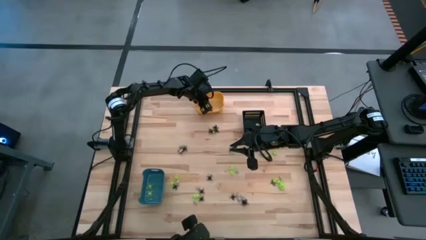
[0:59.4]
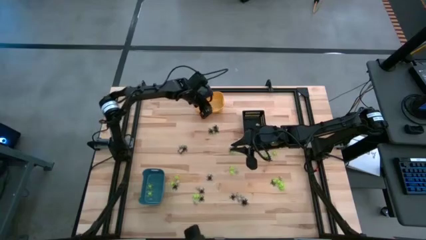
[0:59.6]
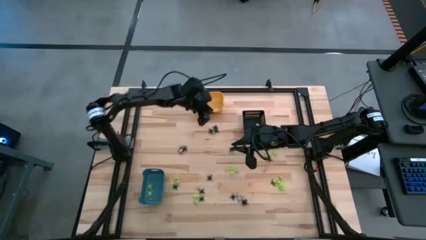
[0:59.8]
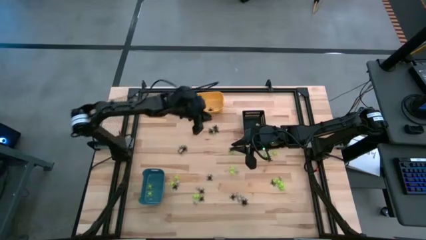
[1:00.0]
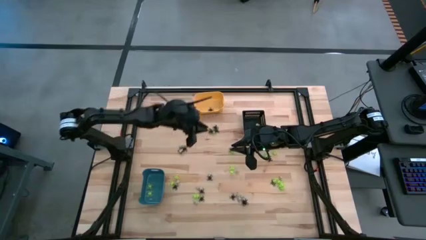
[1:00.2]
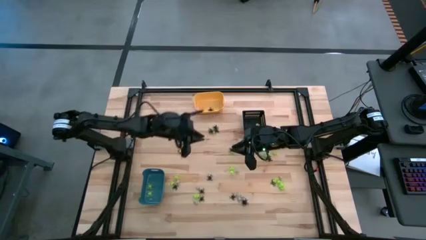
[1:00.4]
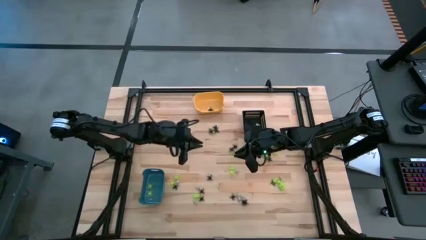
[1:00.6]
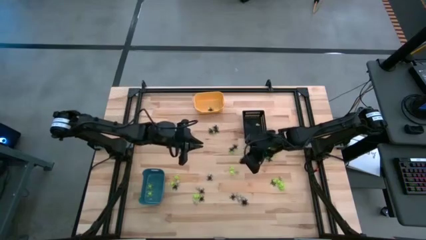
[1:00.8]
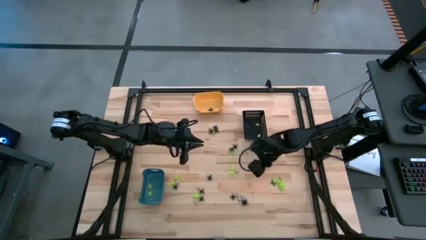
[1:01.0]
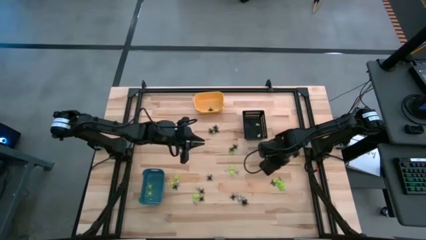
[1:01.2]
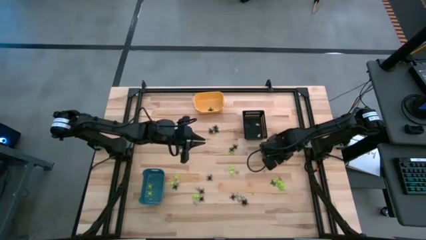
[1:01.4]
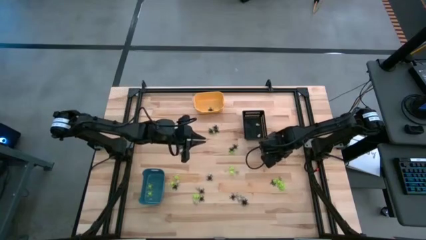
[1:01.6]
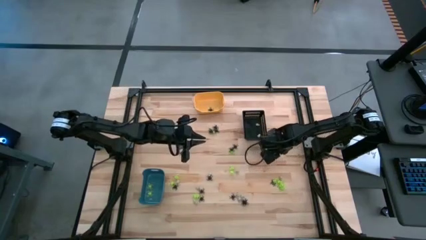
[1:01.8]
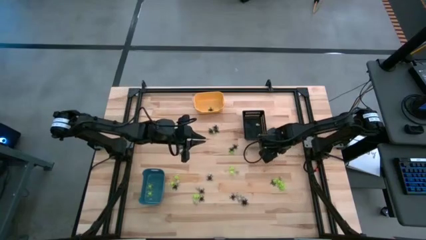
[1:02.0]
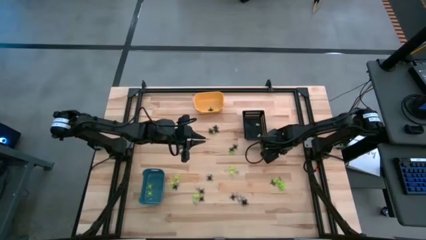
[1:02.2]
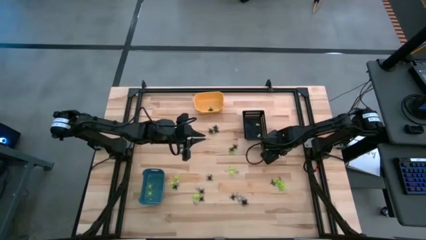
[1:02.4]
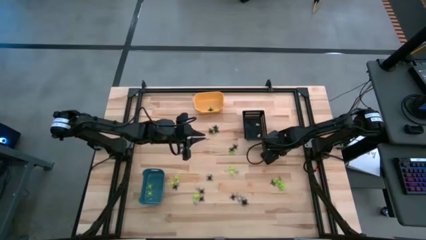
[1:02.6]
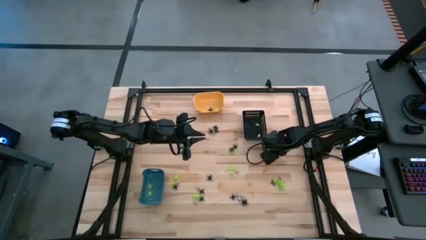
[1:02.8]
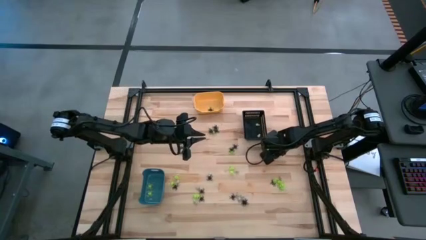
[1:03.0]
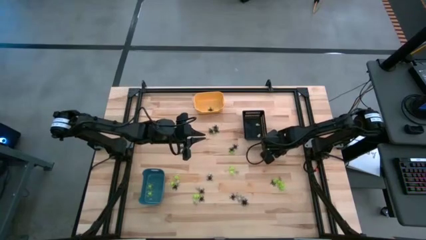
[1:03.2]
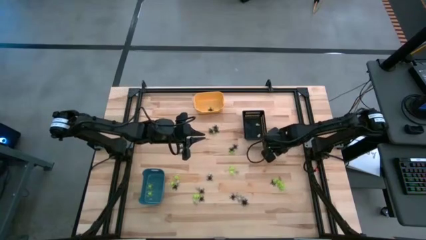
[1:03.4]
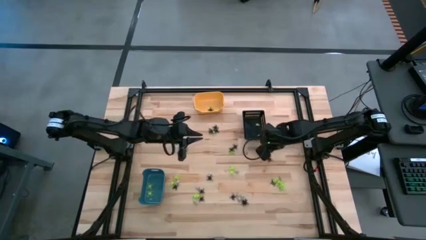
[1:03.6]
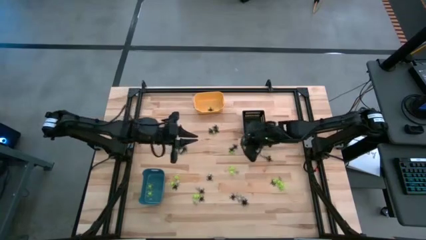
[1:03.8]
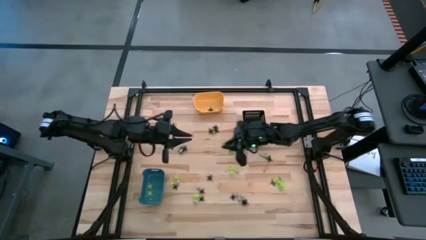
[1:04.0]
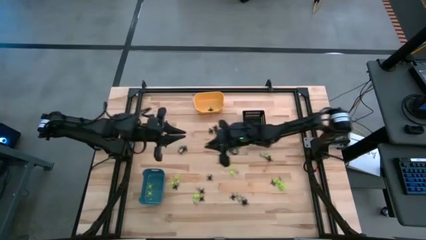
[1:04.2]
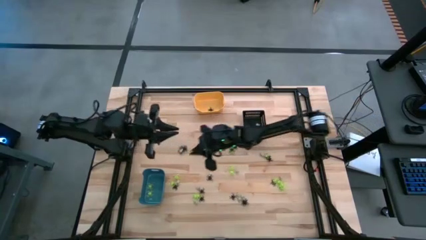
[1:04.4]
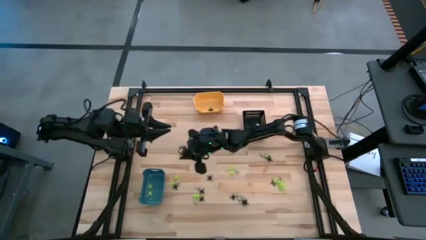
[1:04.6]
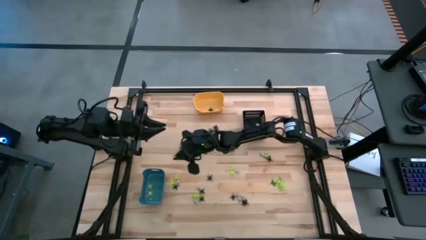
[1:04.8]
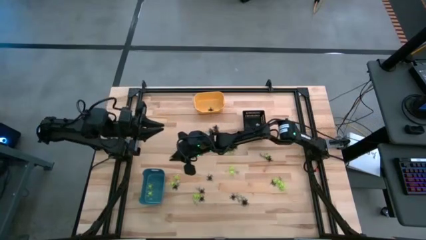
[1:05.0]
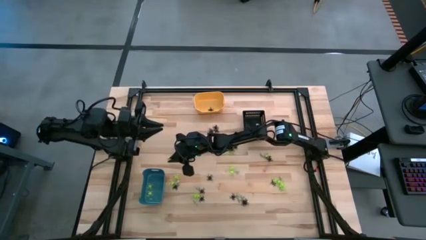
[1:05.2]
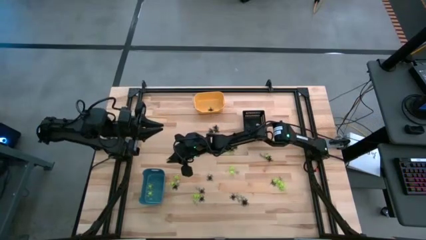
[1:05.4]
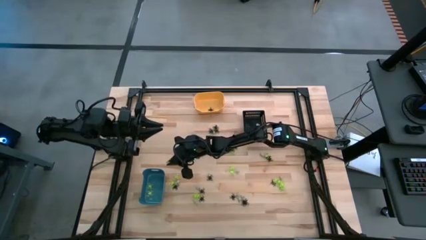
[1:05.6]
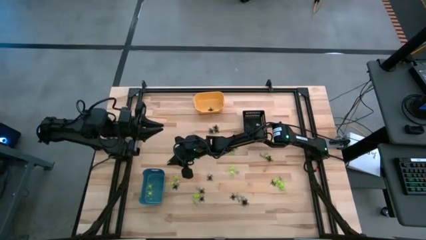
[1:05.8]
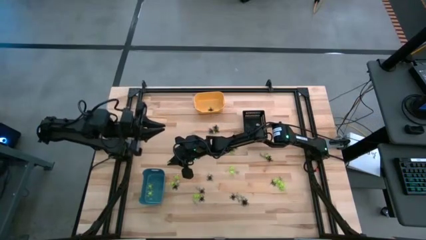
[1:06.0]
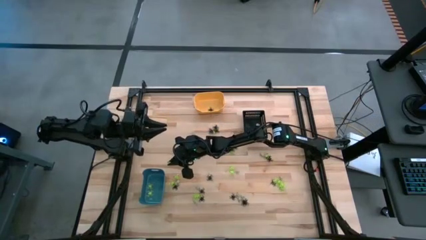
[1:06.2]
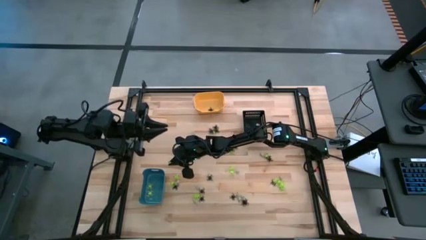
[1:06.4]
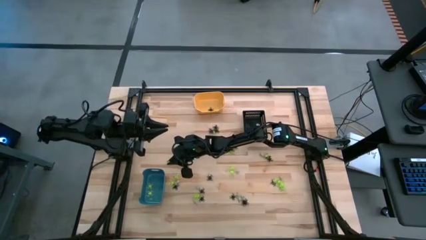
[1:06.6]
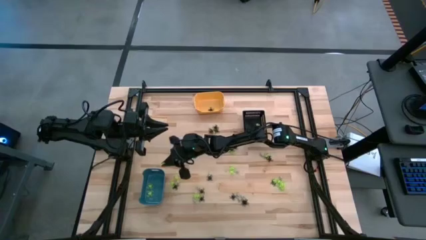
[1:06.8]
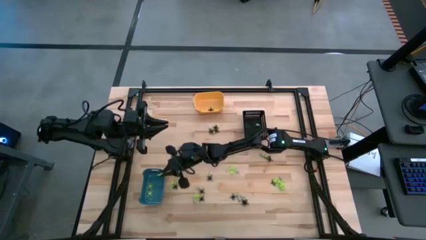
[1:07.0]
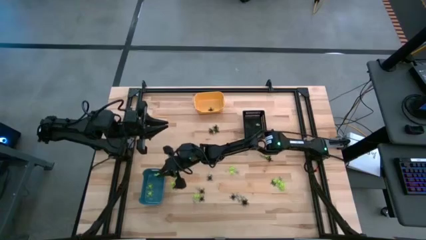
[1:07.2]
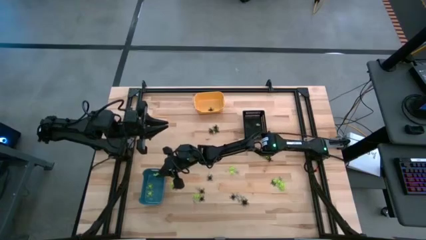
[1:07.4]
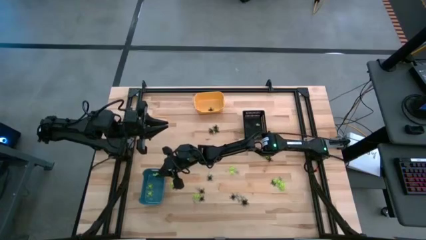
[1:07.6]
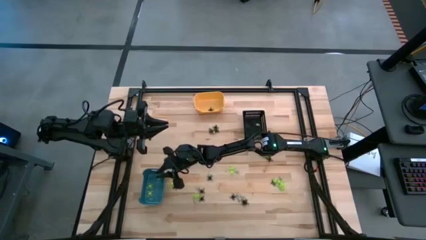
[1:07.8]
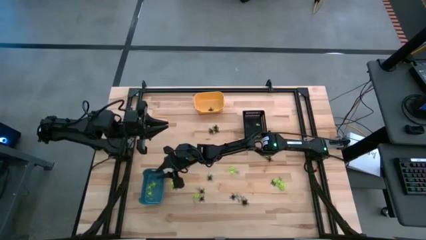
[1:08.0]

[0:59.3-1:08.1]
Task: Sort Halloween decoration
Put the green spider toy into the blue bin

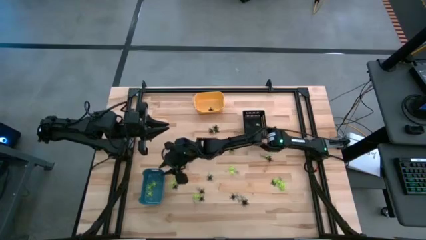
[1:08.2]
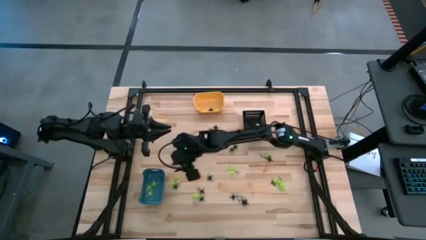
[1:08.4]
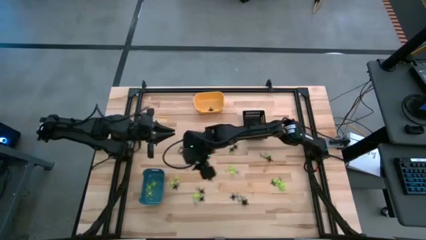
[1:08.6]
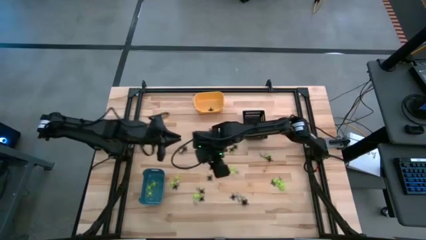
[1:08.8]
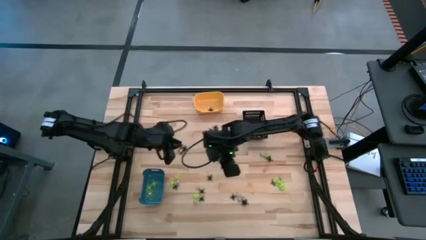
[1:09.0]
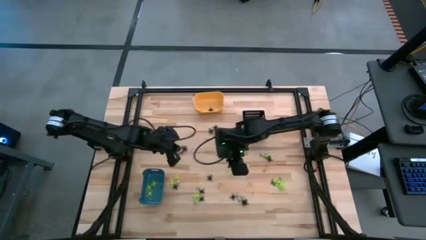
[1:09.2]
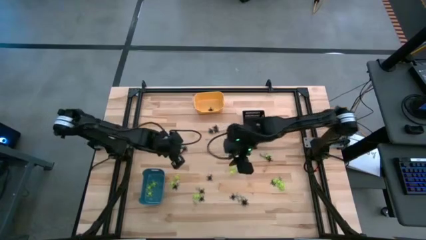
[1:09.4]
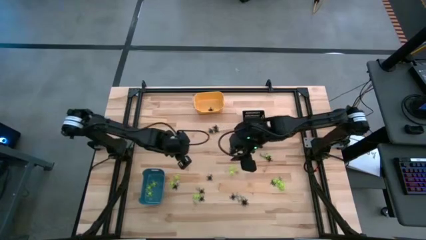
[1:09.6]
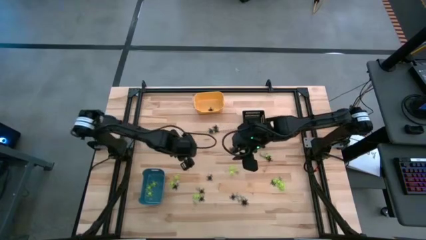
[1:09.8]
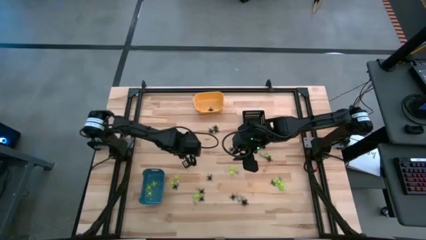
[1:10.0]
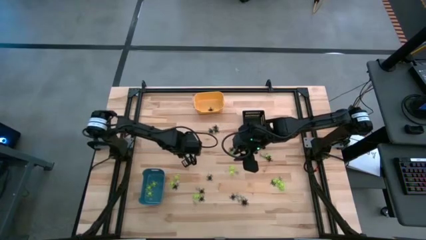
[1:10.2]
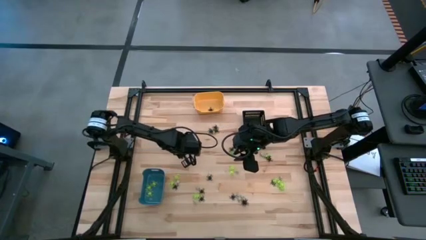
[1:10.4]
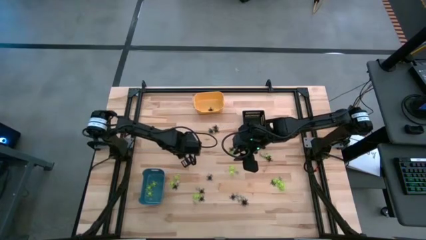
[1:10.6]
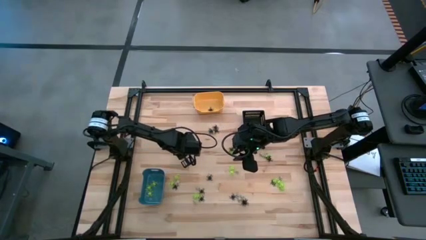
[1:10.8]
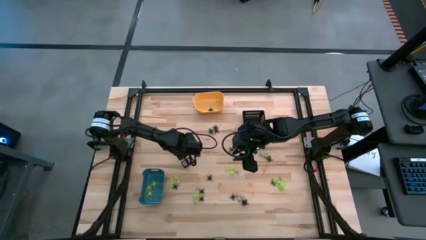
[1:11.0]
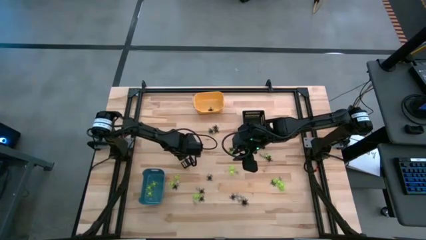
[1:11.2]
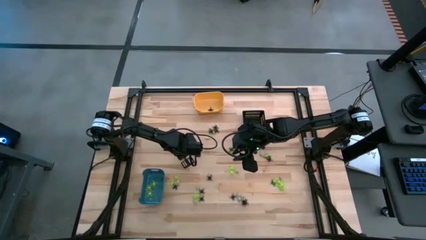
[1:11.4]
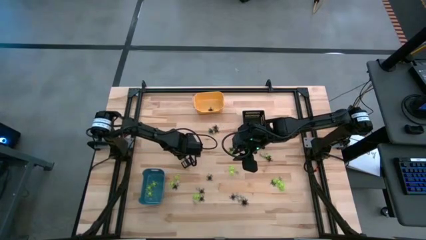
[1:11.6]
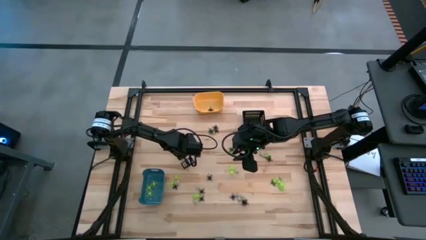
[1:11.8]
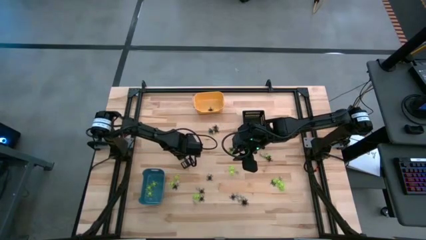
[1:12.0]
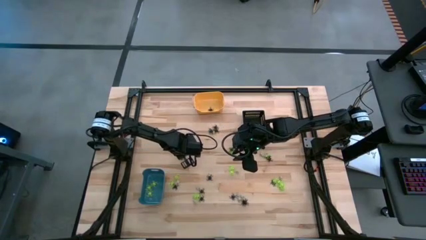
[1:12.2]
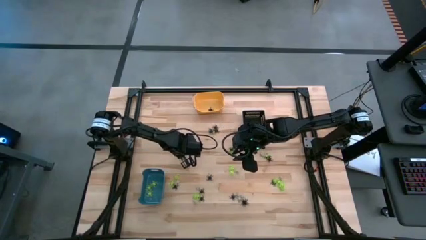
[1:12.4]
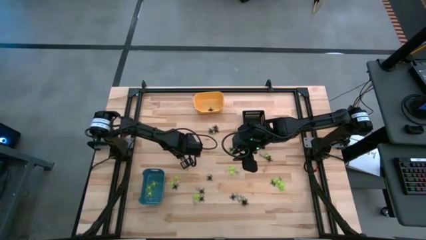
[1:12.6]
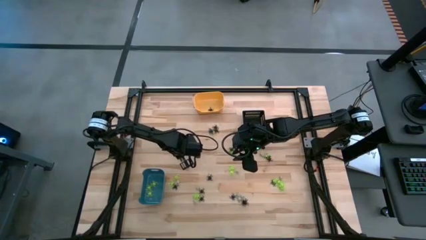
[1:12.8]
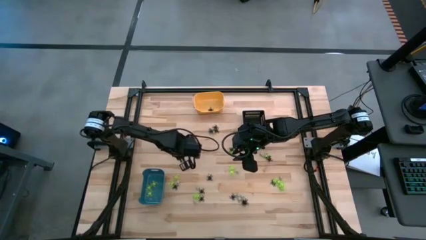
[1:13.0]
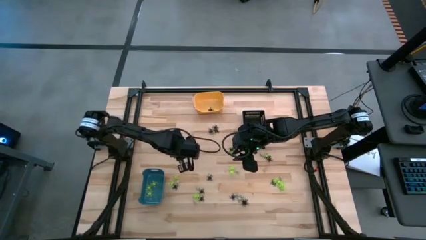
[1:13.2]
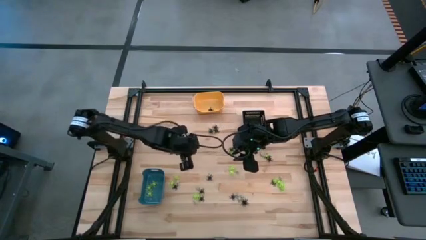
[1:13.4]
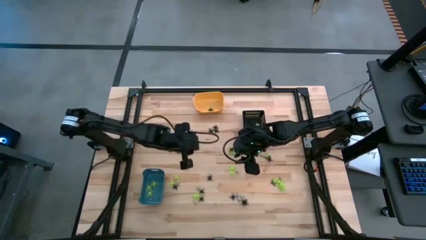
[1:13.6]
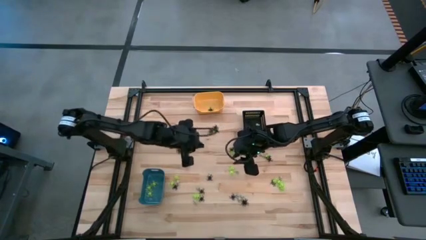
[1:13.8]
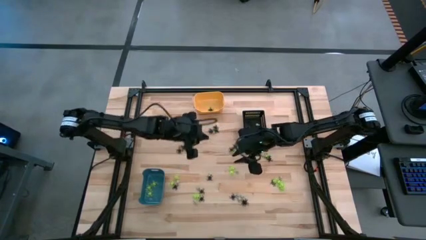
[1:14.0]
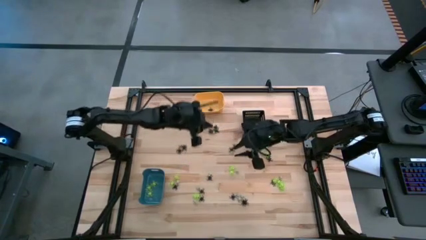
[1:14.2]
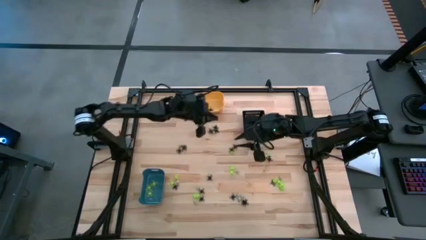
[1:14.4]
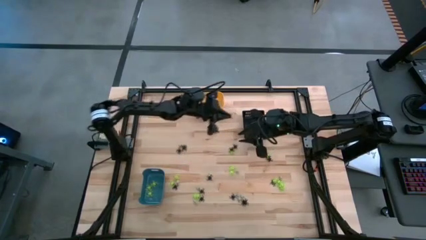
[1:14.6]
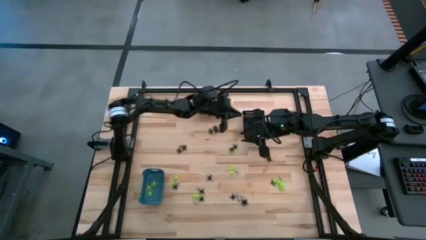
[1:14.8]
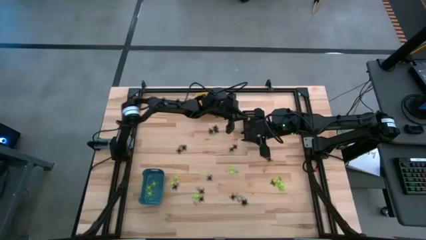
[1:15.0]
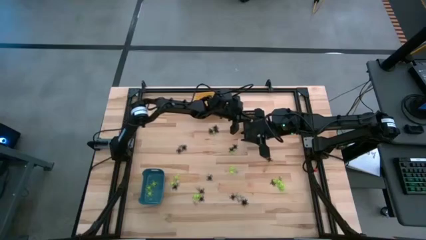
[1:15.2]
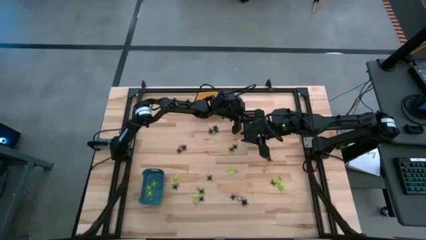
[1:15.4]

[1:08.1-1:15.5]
Put the white skull toy into the black bin
